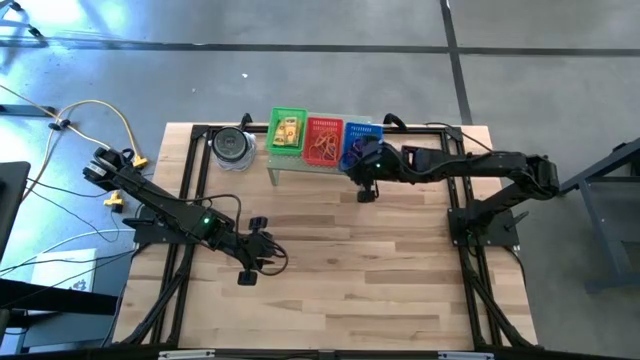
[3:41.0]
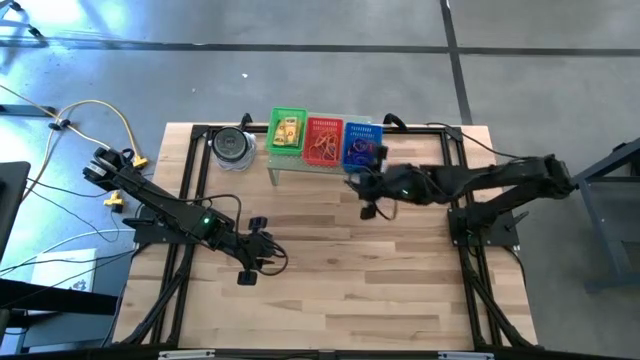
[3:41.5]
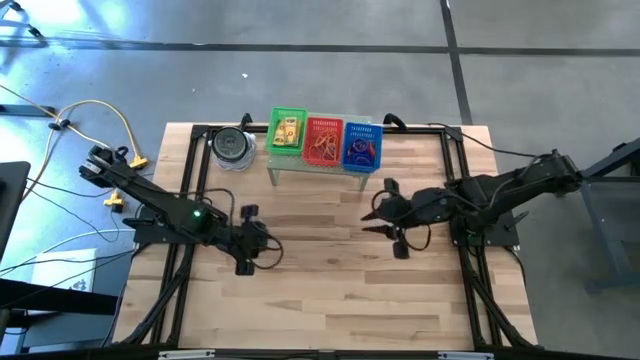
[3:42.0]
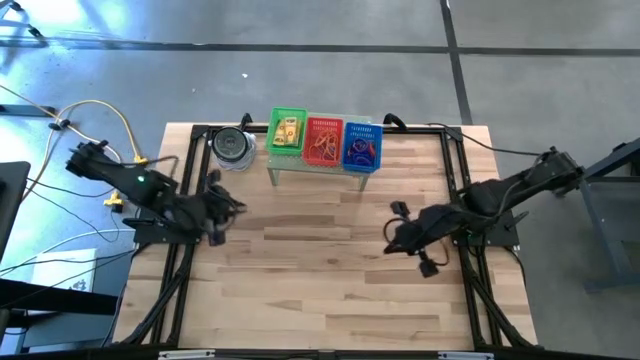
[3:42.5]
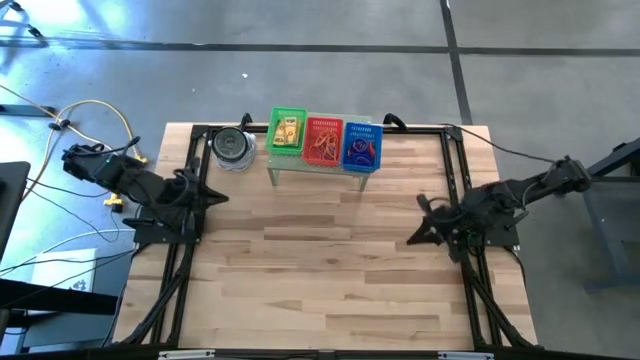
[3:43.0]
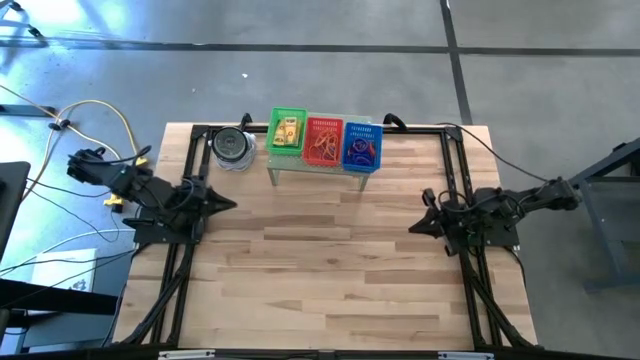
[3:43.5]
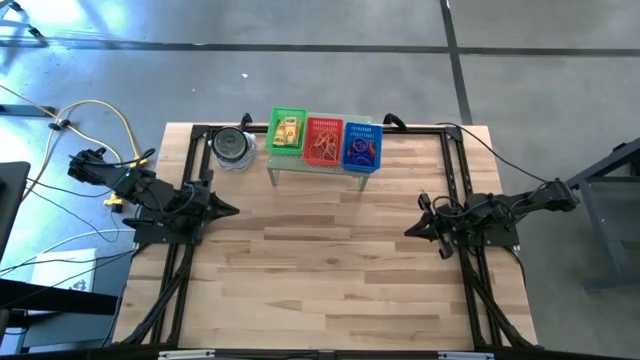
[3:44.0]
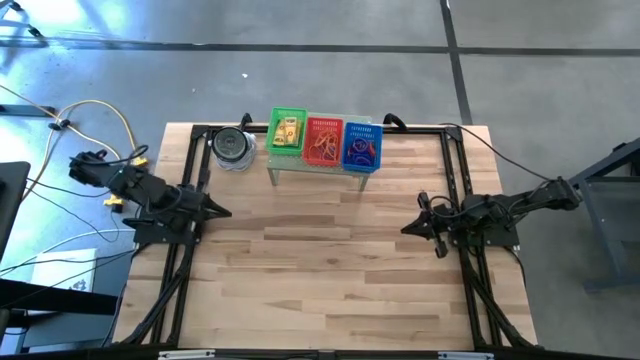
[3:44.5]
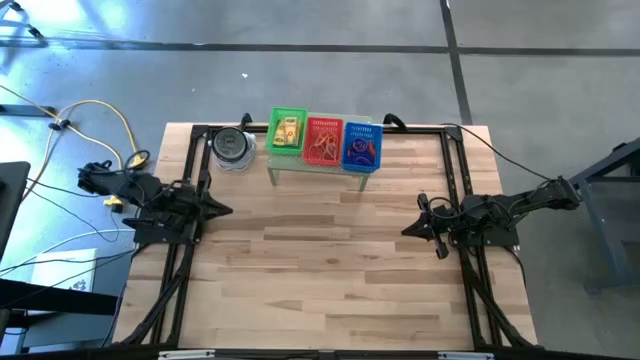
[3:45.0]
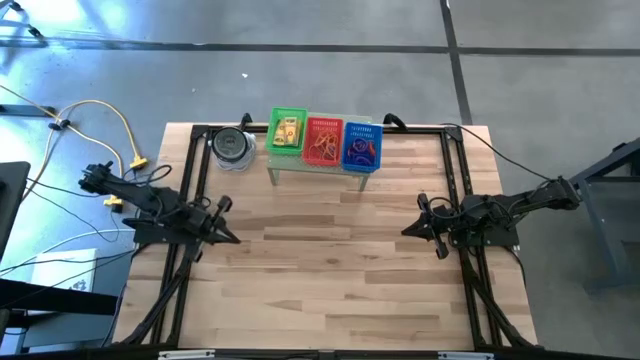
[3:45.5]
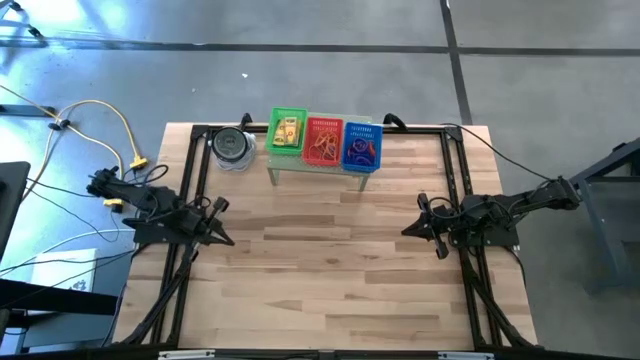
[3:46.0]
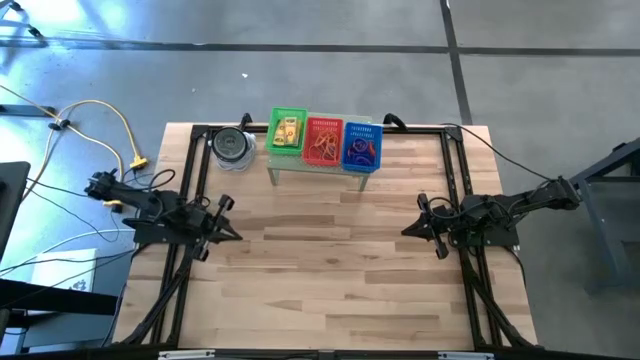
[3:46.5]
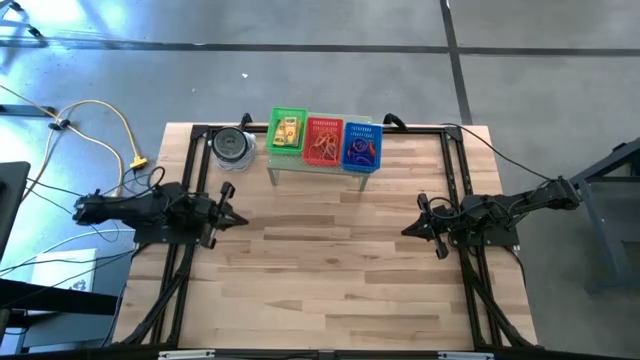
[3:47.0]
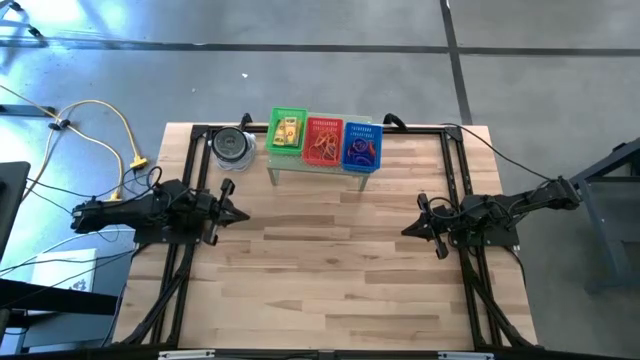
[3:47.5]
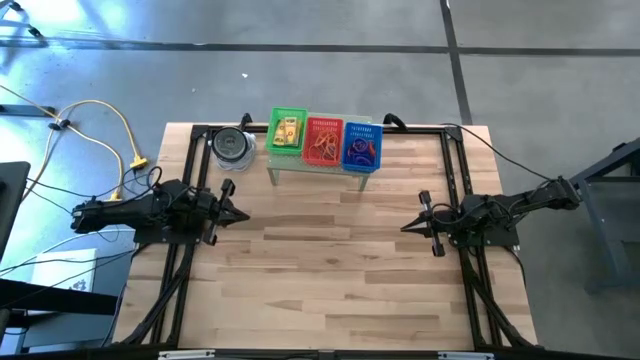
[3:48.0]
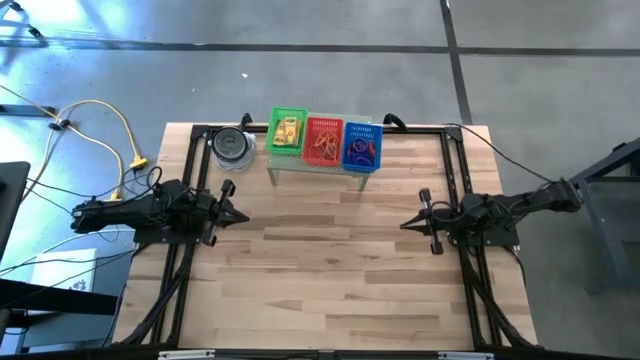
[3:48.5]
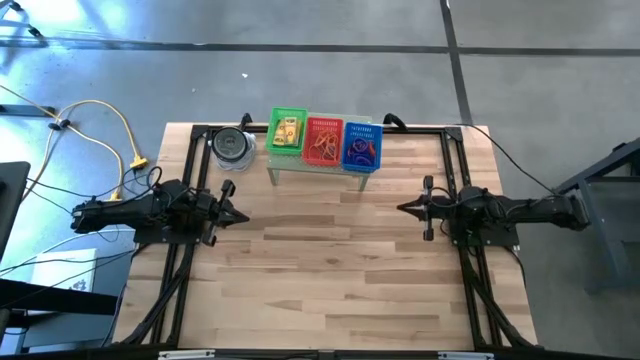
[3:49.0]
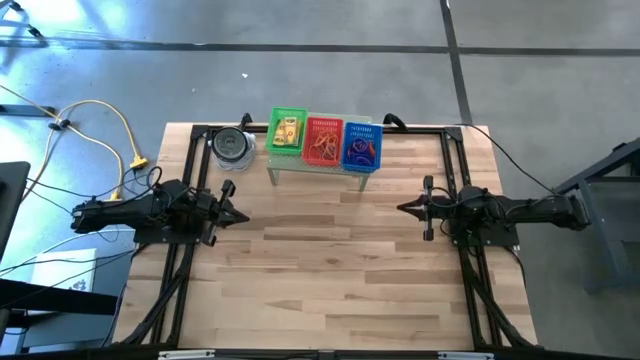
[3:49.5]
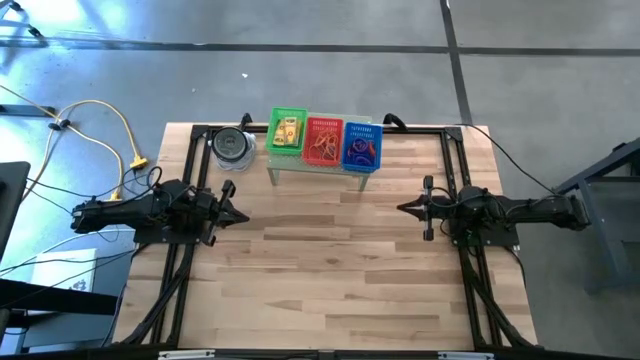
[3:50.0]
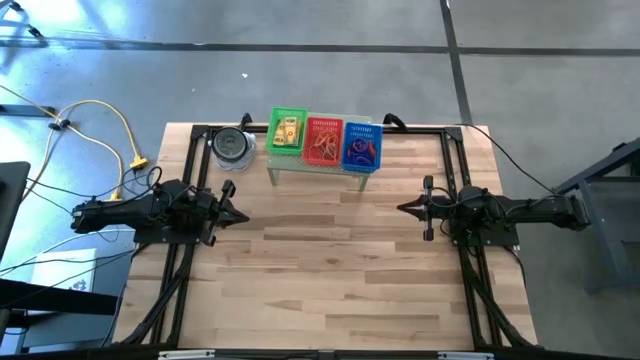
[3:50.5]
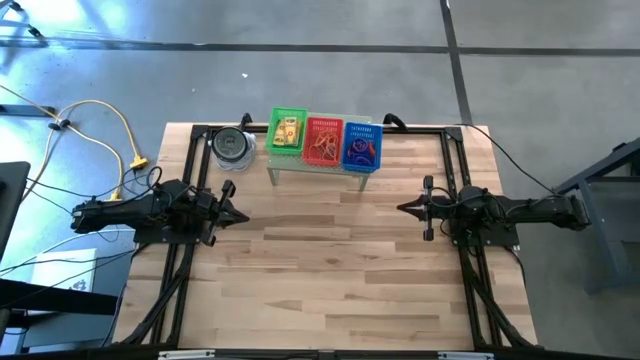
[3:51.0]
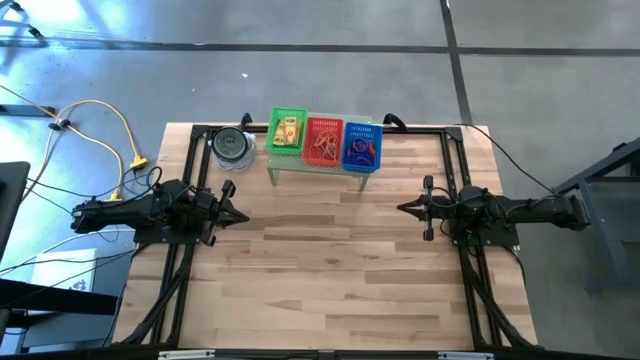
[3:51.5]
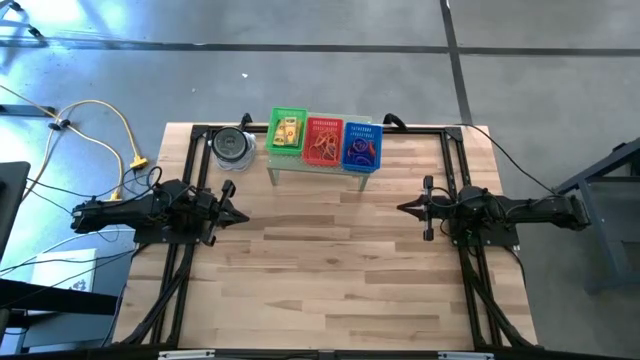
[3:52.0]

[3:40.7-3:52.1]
Task: Pick & Place Office Desk Supplies
Return to Home Position

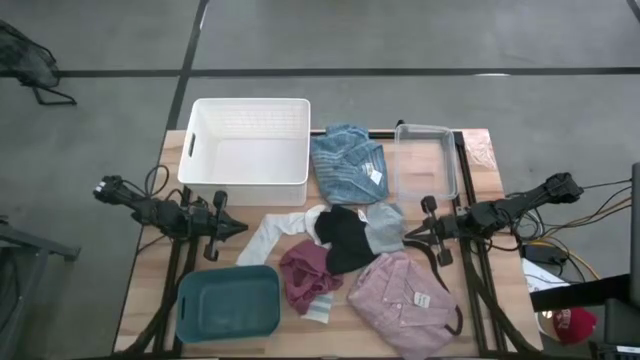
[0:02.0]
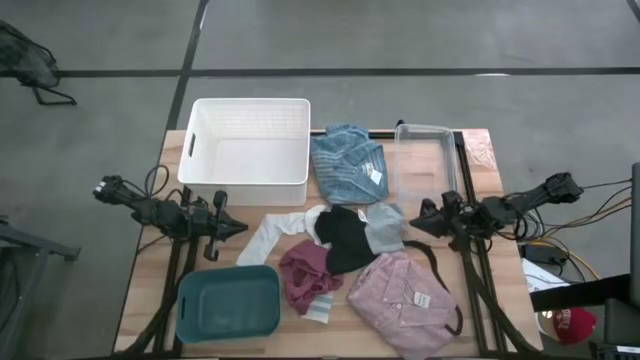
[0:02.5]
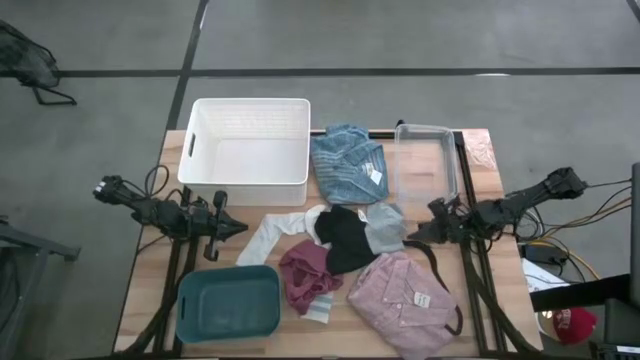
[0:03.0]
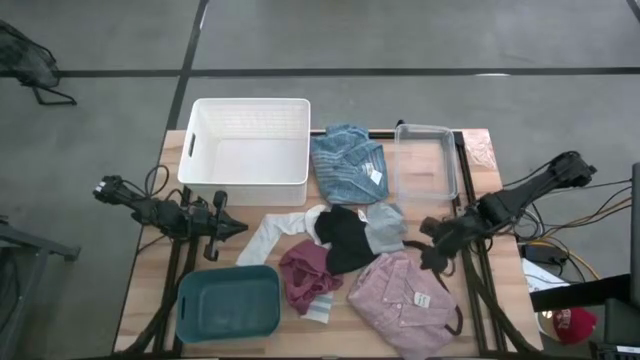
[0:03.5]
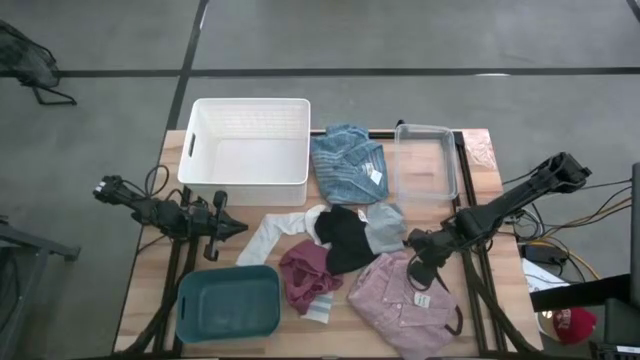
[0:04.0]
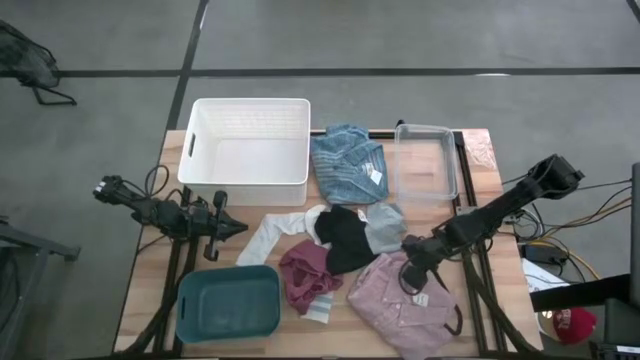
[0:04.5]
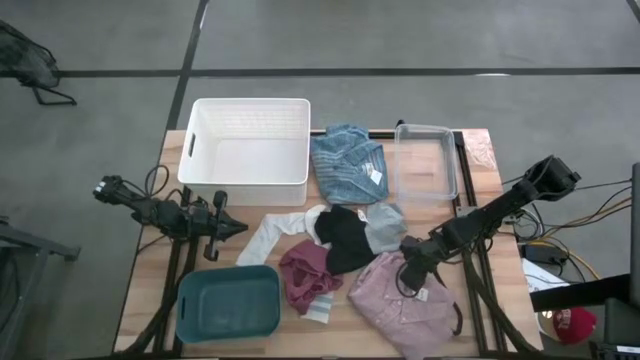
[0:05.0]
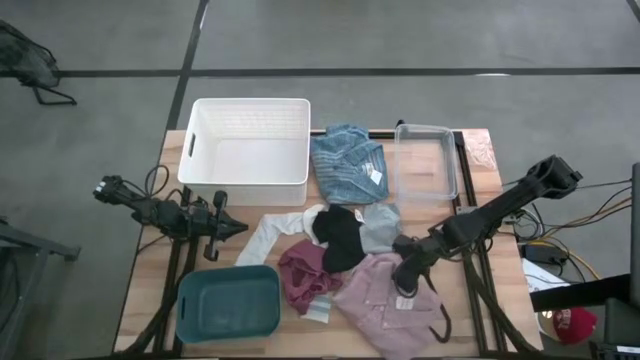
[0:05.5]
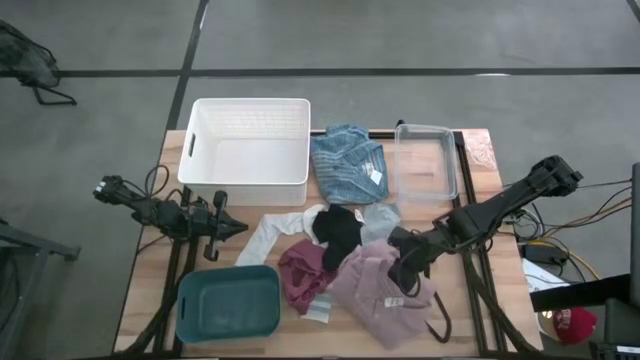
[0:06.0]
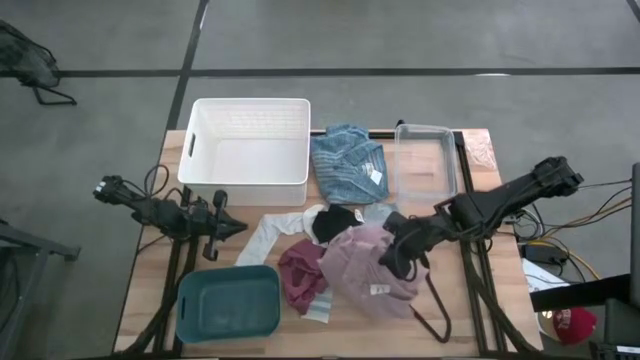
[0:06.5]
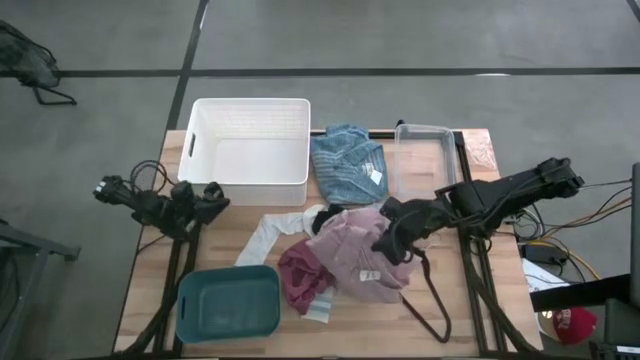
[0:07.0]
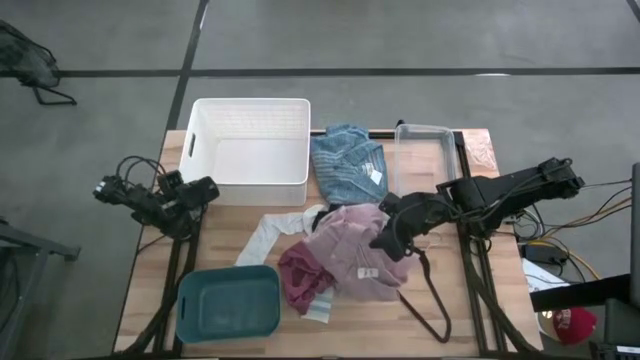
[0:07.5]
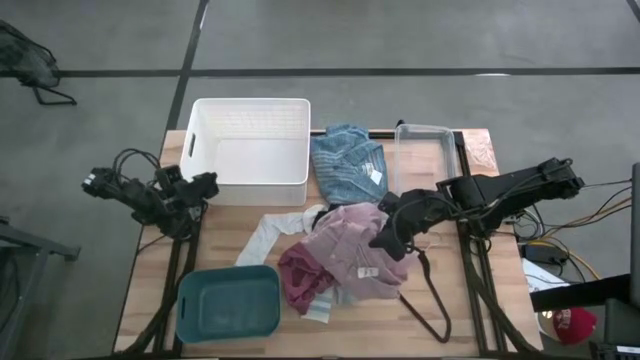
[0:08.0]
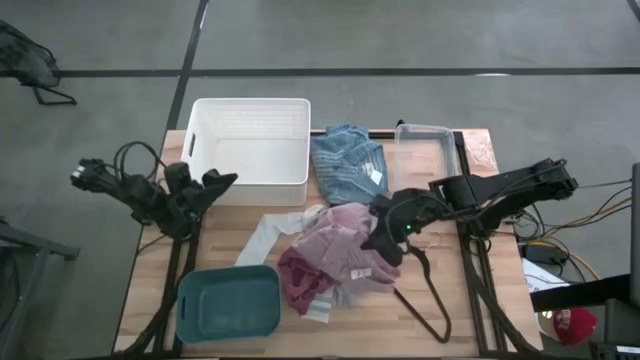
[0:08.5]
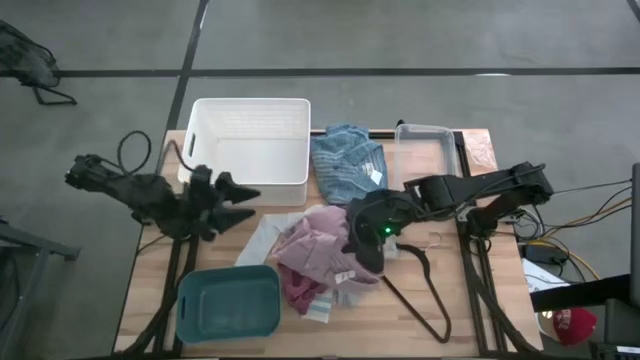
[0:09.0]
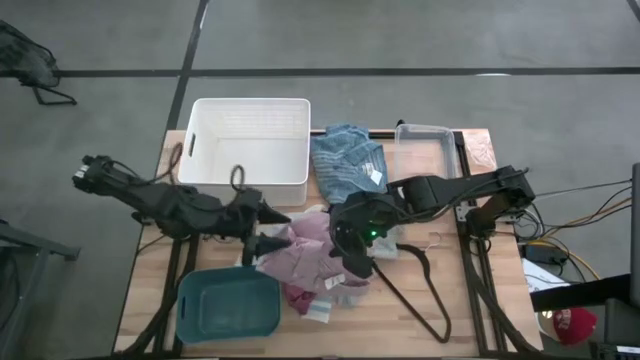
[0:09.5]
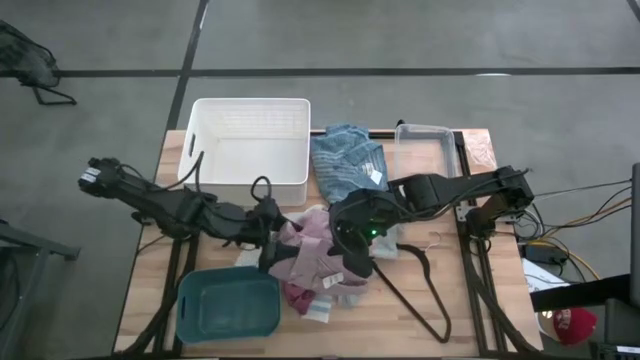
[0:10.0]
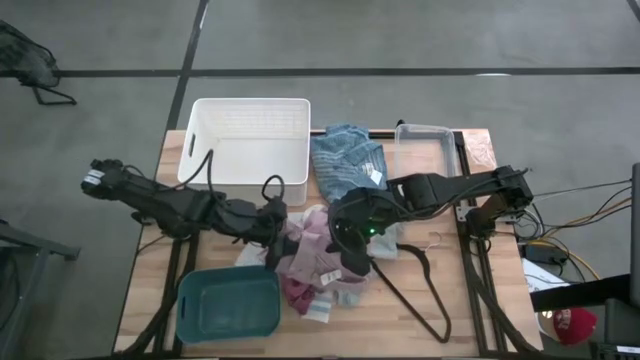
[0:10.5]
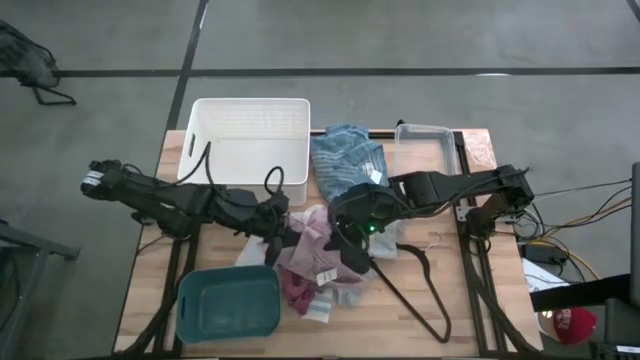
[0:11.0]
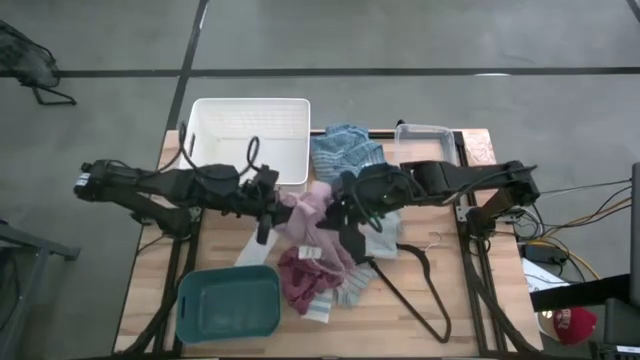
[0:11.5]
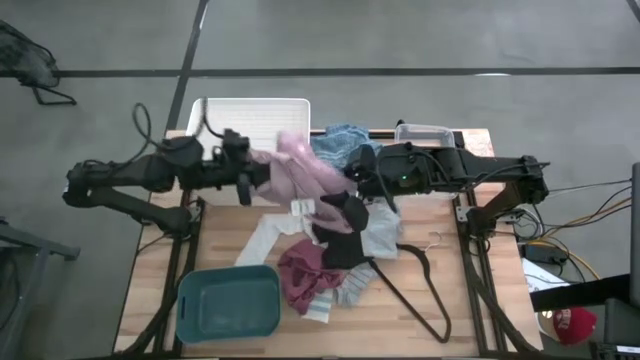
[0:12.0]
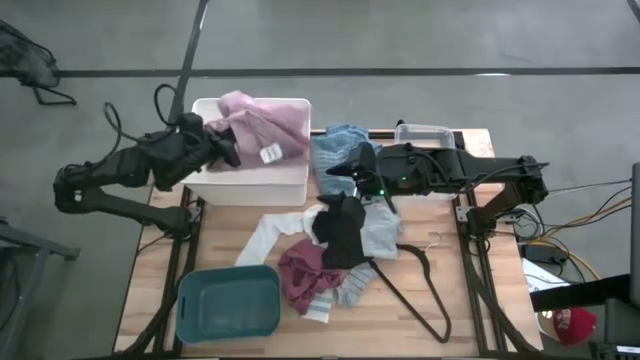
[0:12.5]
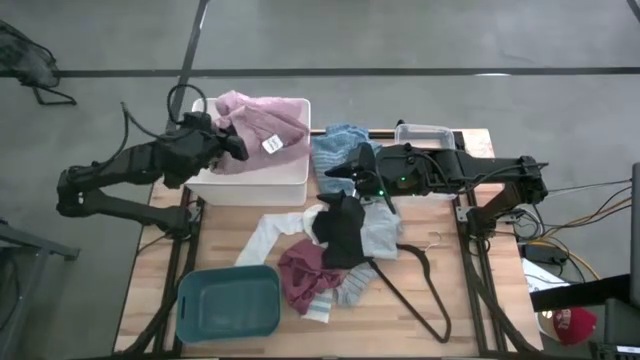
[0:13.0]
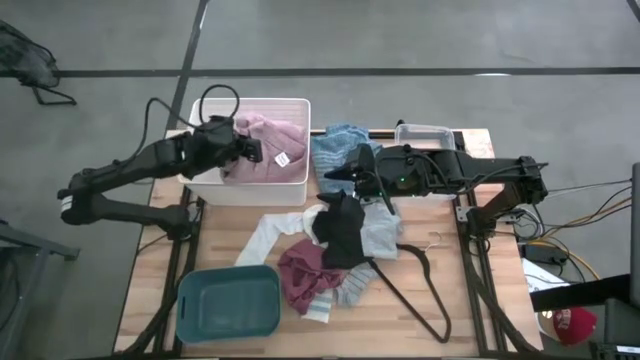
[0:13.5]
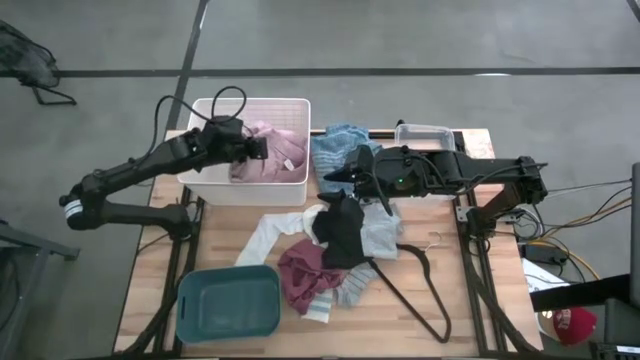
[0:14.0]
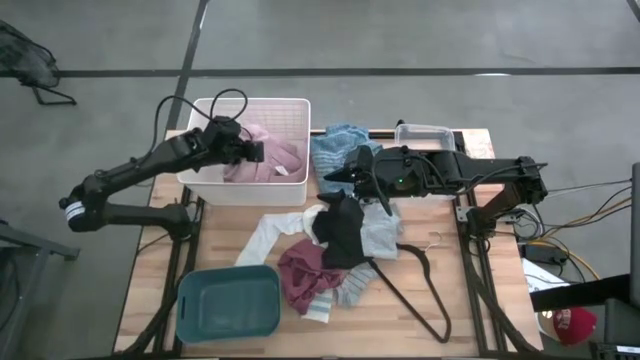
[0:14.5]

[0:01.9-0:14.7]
Task: Pick & Place Cloths
Put the pink polo shirt into the laundry organizer
